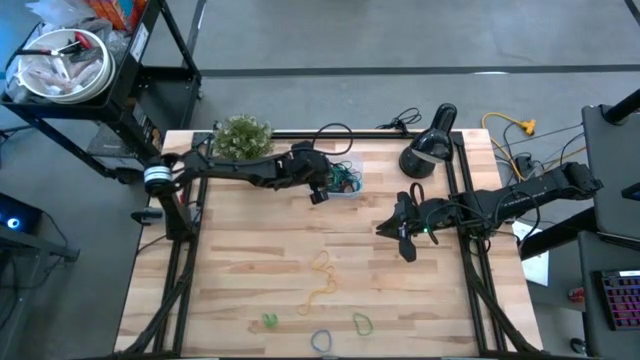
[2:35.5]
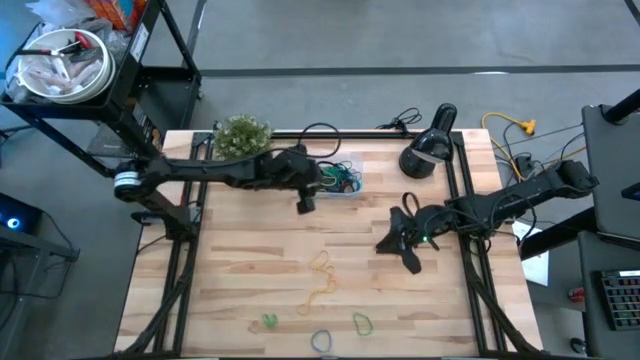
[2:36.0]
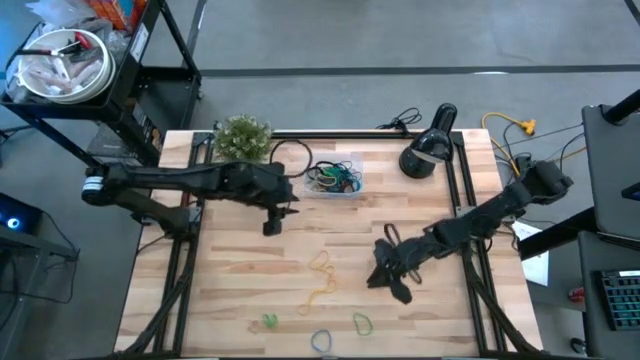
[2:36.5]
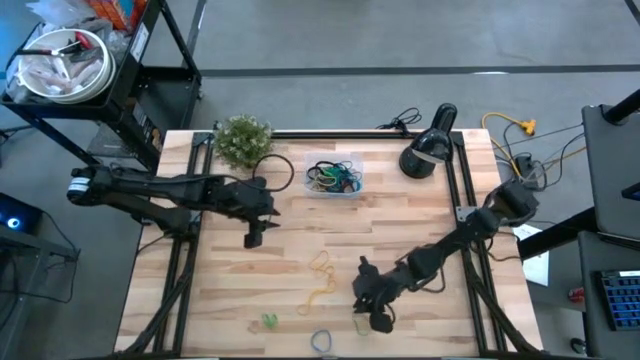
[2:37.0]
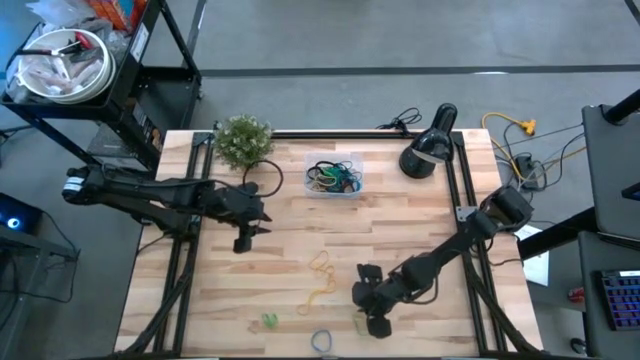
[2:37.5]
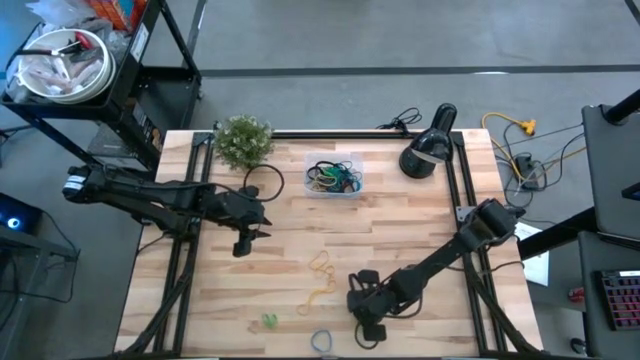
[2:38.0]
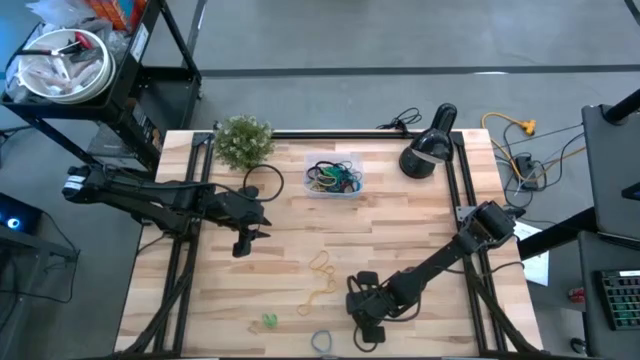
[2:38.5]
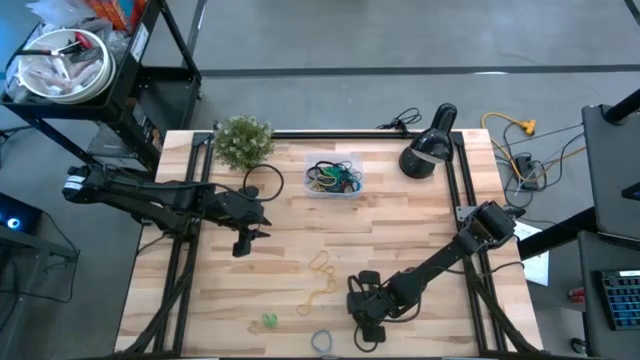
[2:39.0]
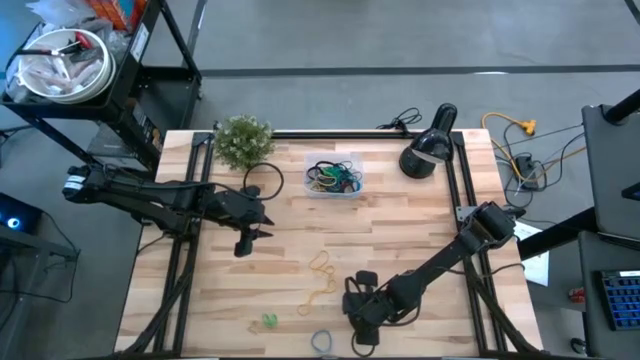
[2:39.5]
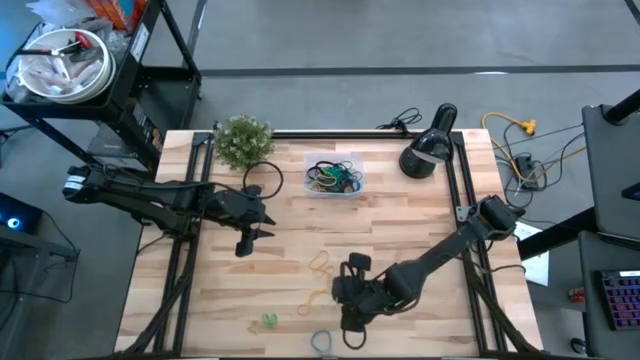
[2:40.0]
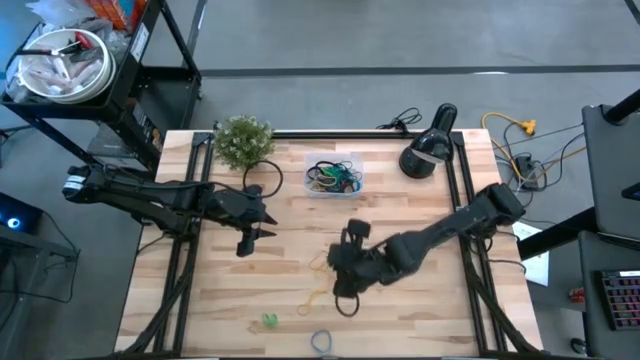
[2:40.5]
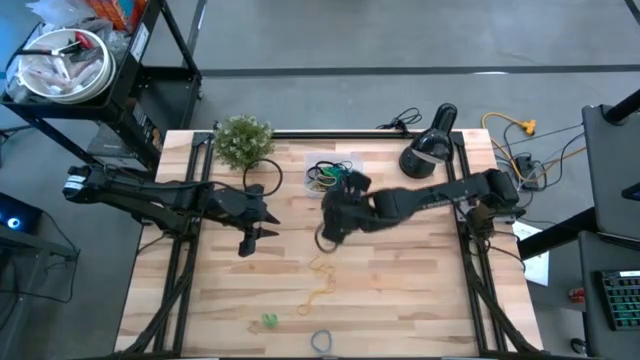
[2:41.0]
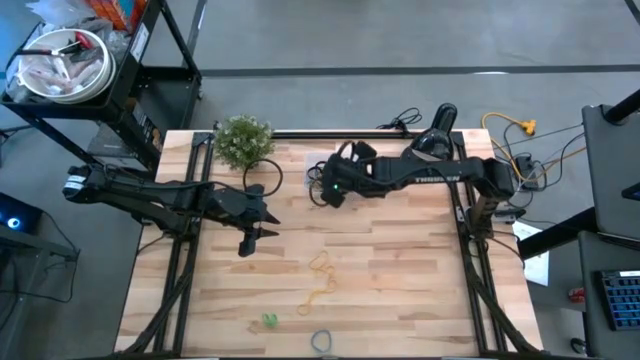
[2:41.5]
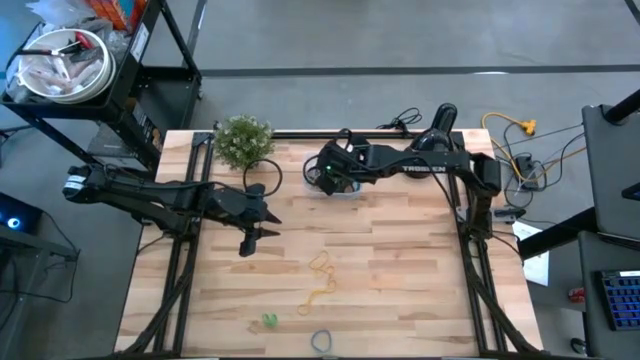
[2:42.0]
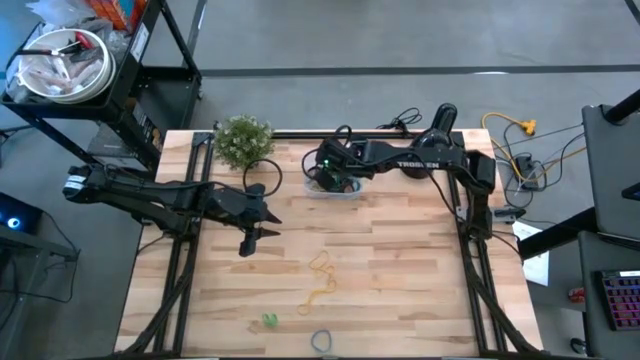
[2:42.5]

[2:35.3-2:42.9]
Task: Pick and place rubber bands into bin
Put the green rubberband into the transparent bin

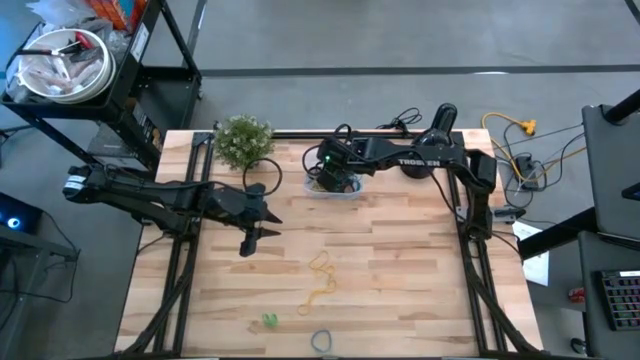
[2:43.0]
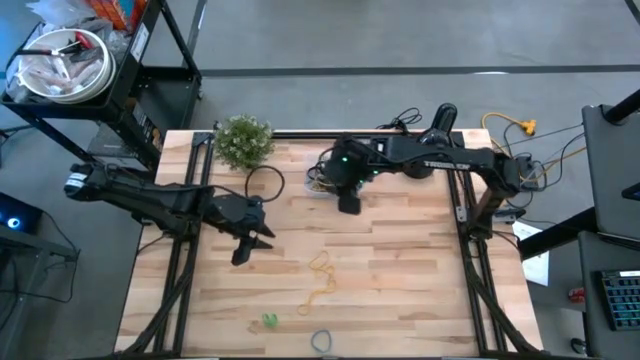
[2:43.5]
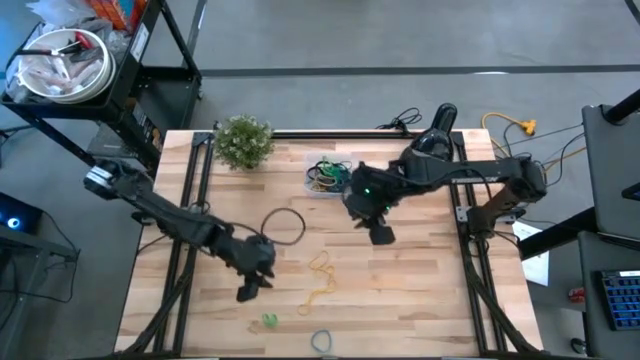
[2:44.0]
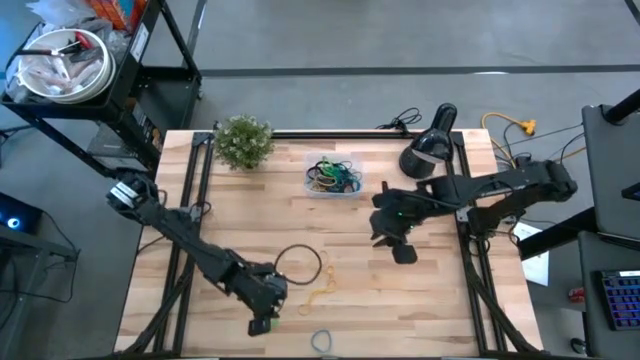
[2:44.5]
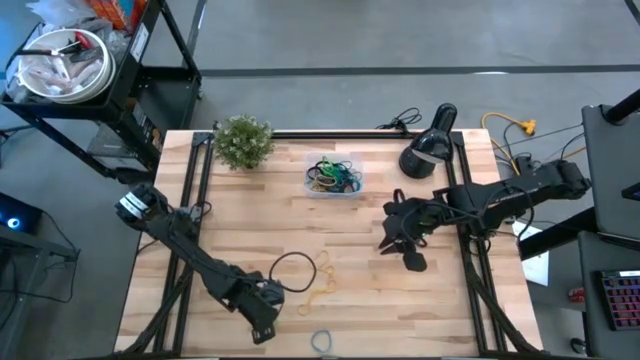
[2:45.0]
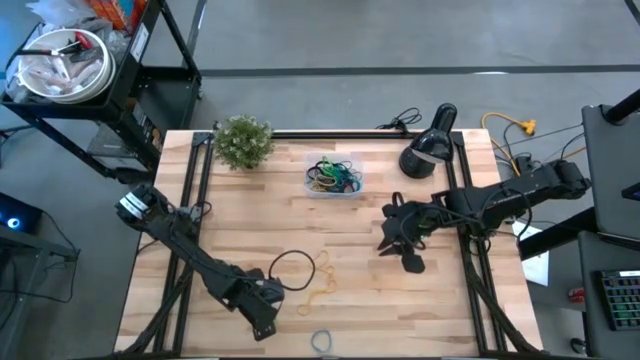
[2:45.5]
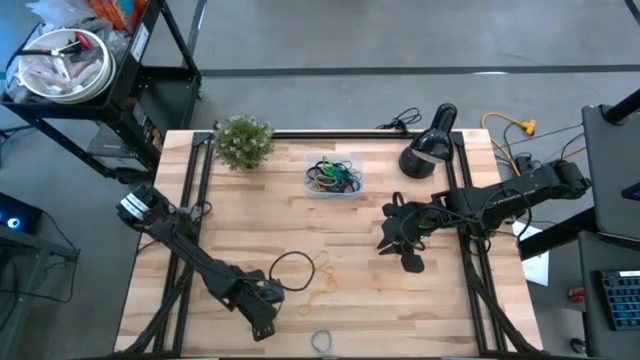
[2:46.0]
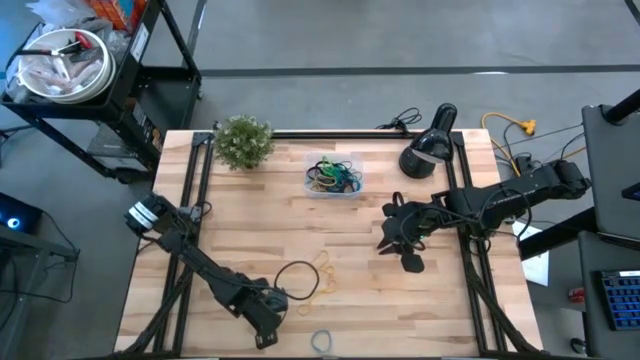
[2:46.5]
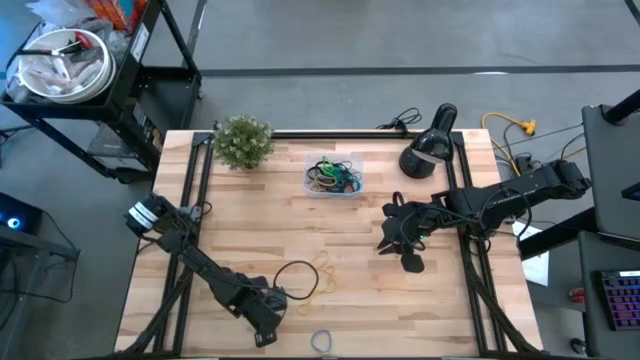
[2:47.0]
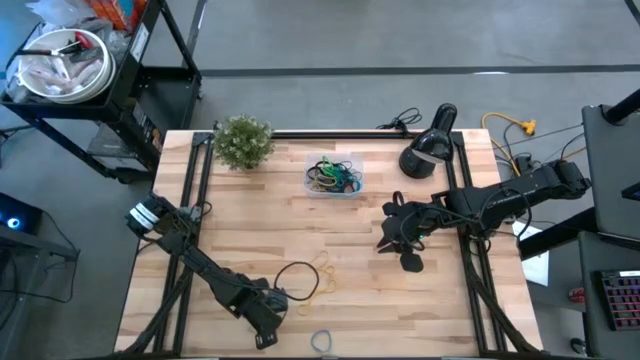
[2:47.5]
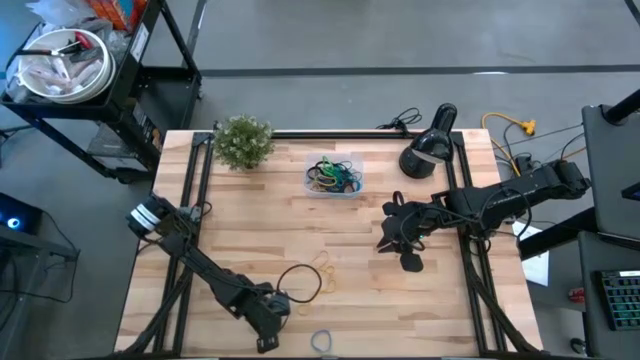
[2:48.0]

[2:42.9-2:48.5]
Put the green rubberband into the transparent bin

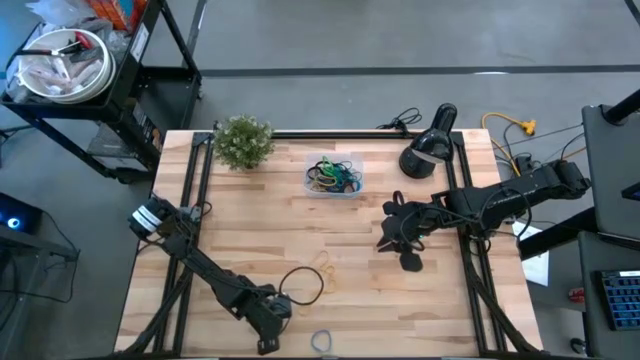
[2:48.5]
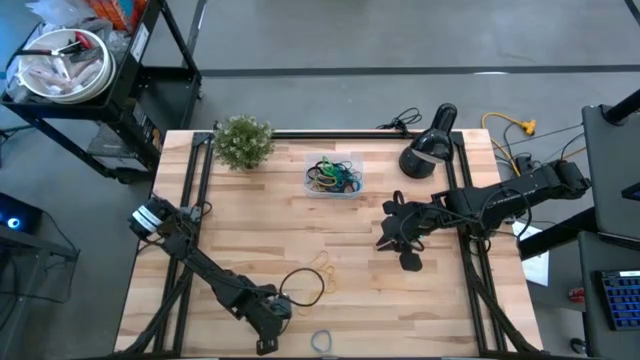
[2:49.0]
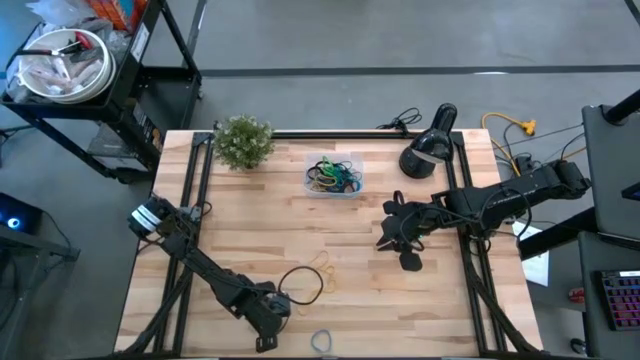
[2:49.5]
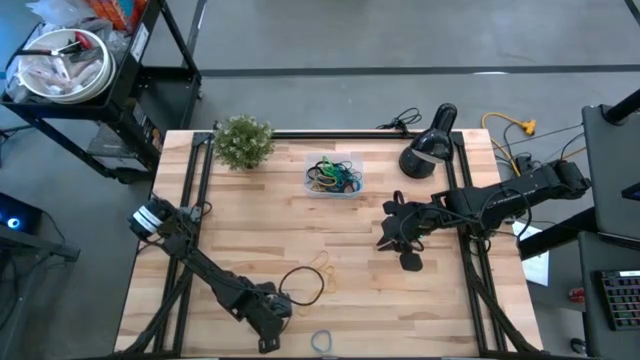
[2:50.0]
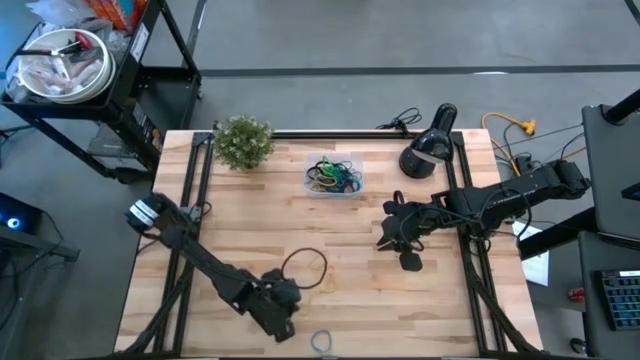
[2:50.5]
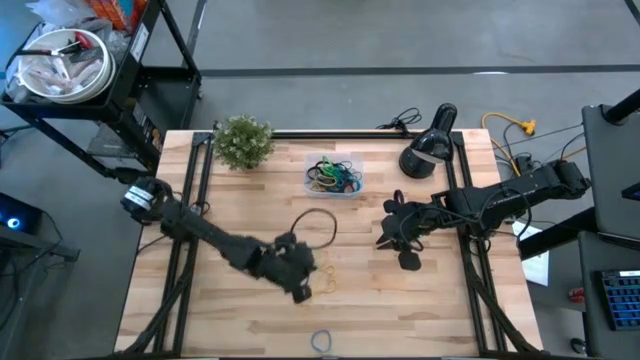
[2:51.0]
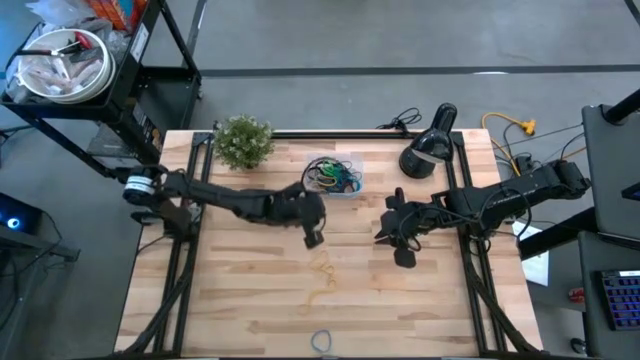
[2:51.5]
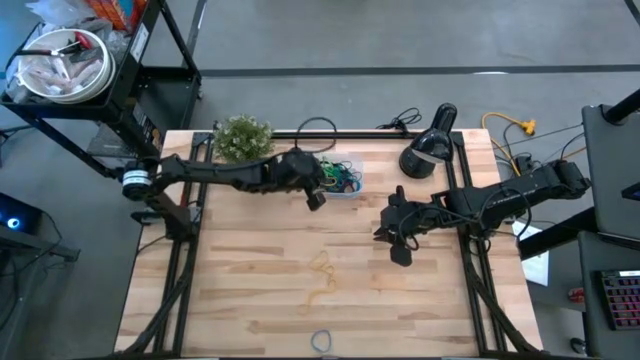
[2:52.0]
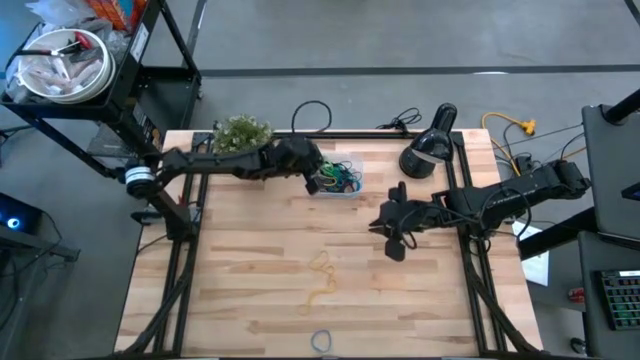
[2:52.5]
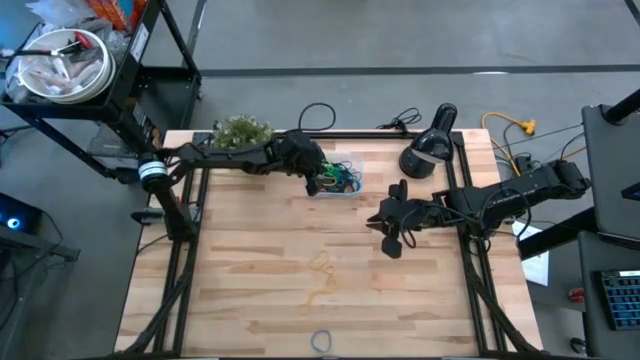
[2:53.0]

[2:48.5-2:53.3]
Put the green rubberband into the transparent bin

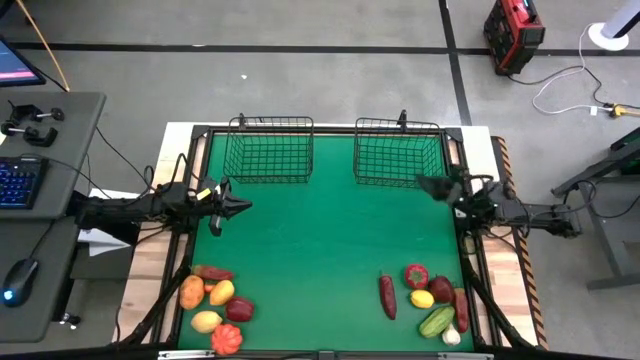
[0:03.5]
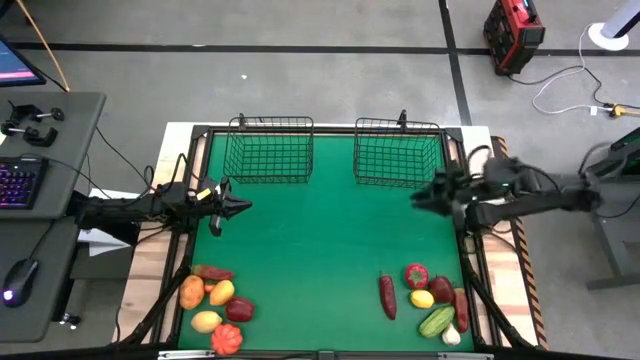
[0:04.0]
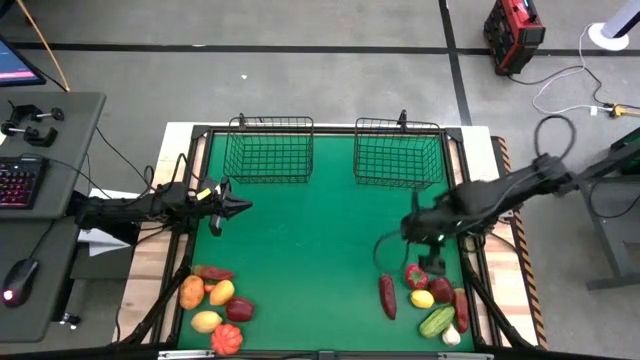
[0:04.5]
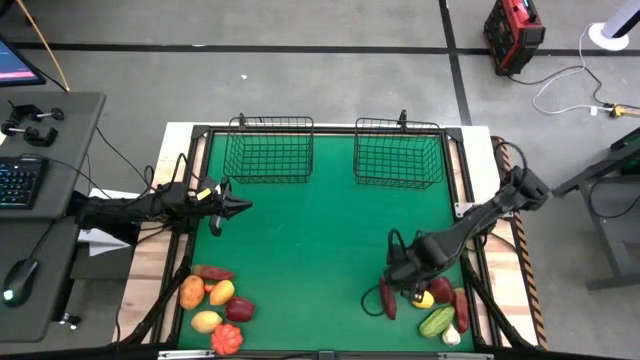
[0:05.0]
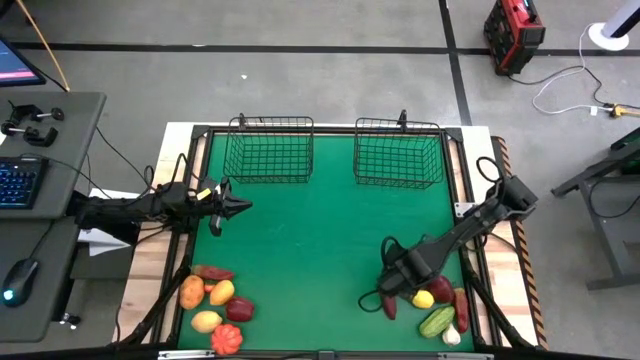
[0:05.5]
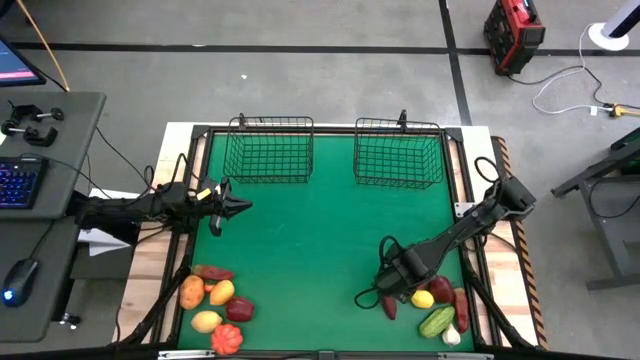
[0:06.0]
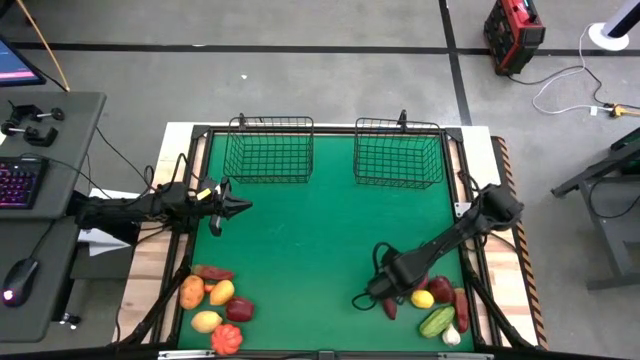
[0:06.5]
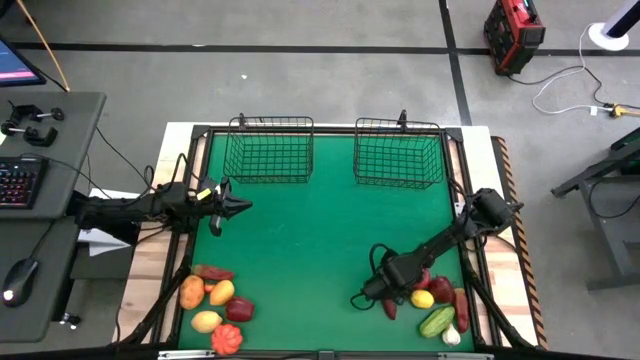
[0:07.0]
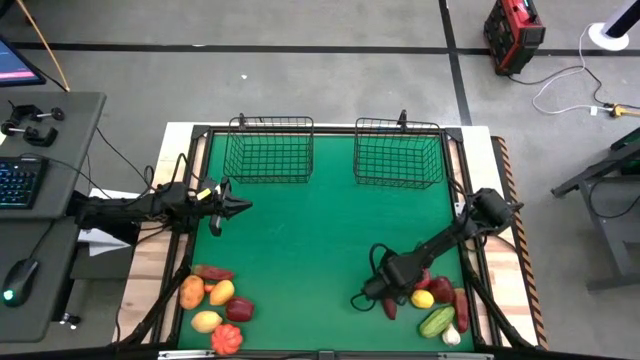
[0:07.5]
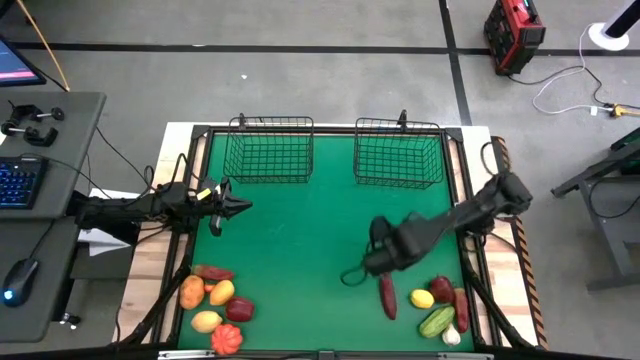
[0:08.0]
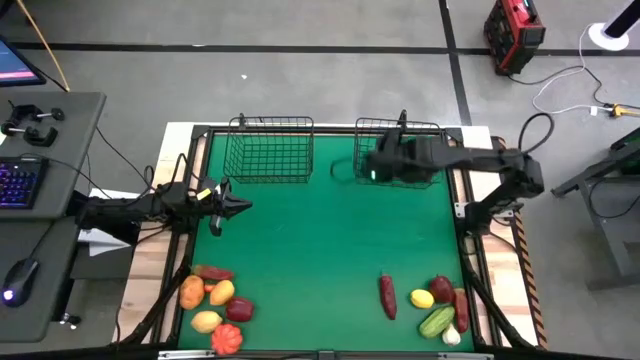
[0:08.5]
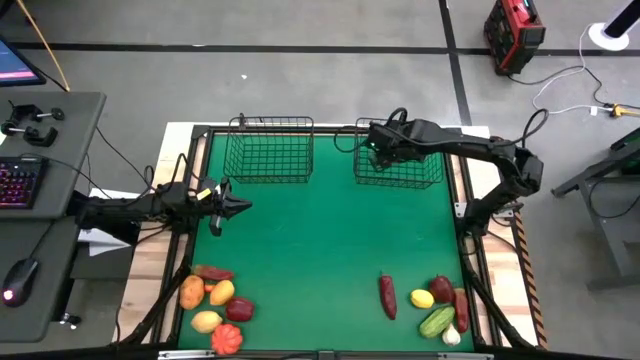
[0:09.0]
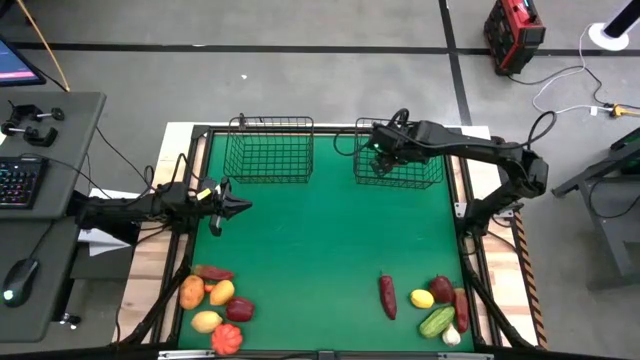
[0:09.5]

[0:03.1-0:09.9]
Task: Sort produce into baskets
Put the red tomato into the right wire basket
